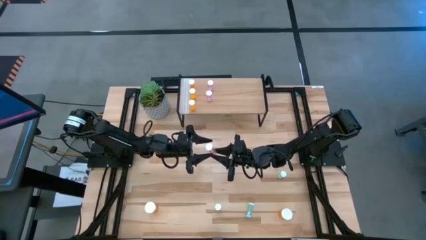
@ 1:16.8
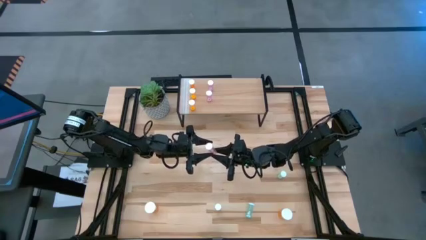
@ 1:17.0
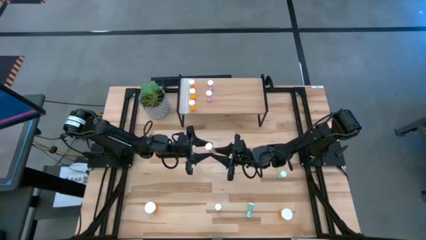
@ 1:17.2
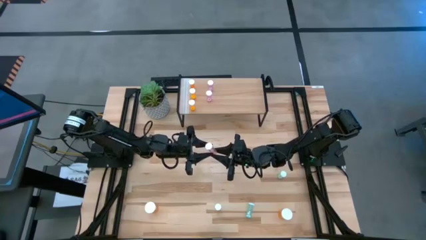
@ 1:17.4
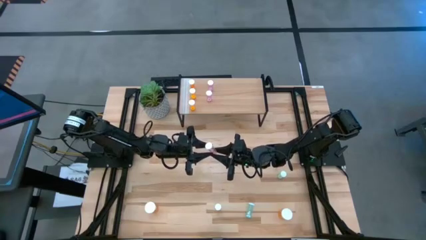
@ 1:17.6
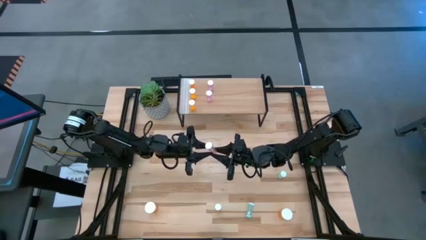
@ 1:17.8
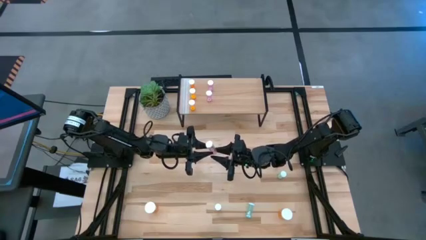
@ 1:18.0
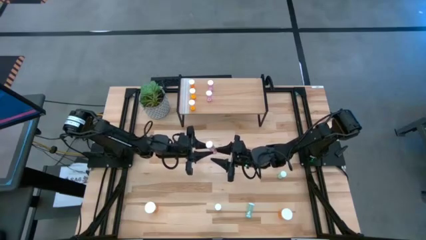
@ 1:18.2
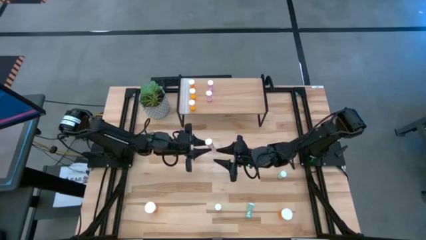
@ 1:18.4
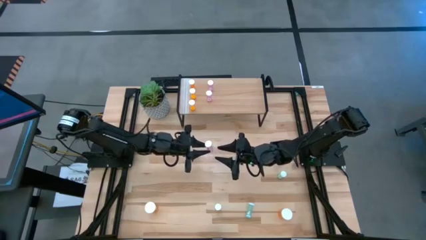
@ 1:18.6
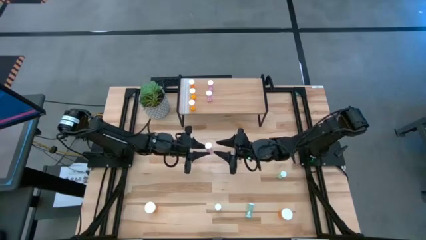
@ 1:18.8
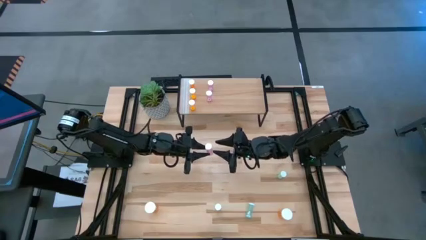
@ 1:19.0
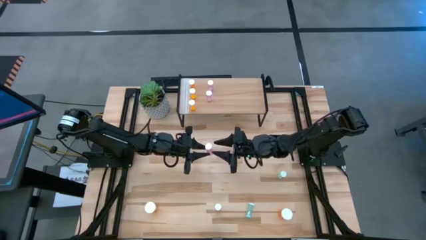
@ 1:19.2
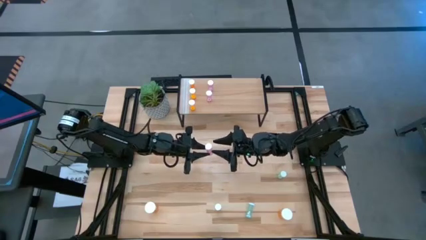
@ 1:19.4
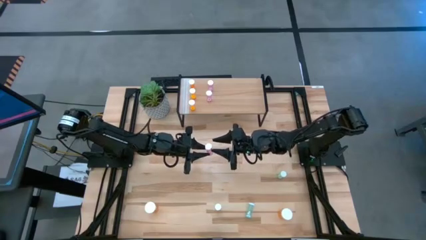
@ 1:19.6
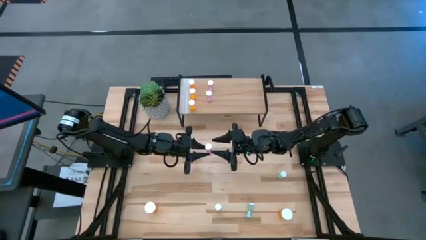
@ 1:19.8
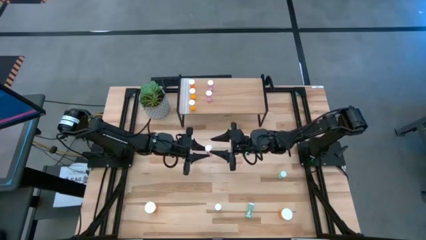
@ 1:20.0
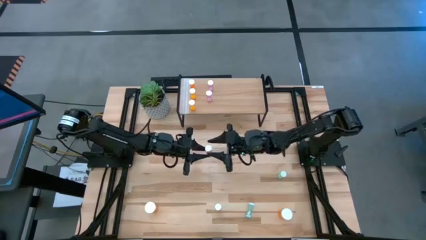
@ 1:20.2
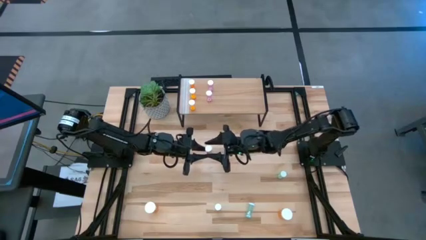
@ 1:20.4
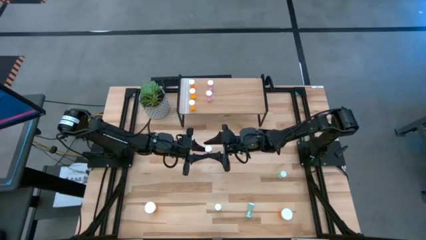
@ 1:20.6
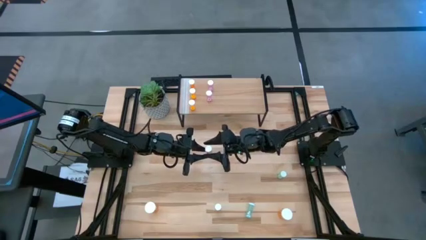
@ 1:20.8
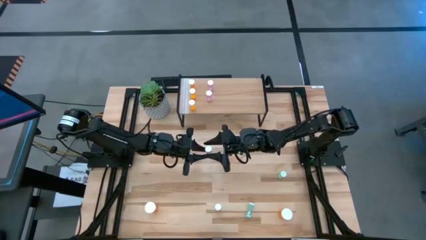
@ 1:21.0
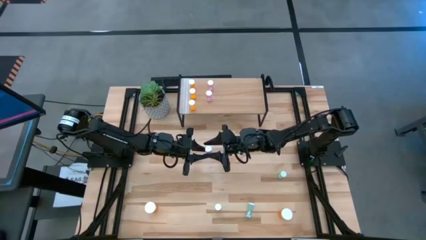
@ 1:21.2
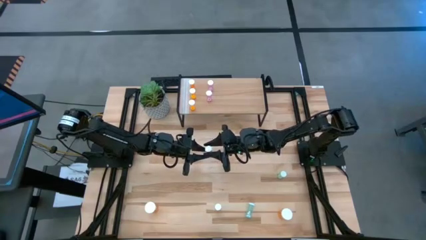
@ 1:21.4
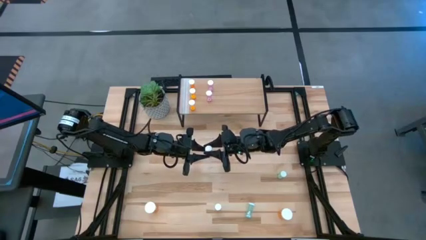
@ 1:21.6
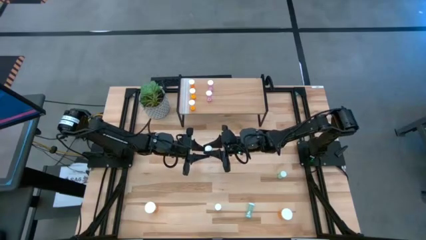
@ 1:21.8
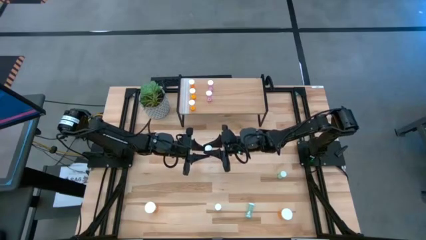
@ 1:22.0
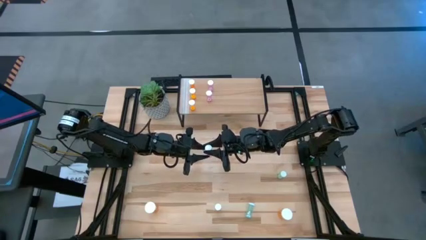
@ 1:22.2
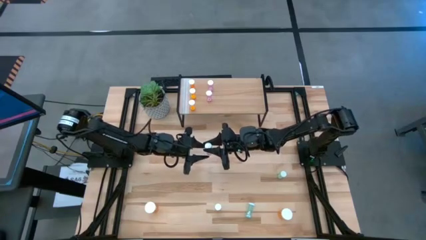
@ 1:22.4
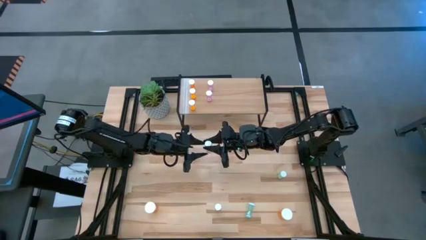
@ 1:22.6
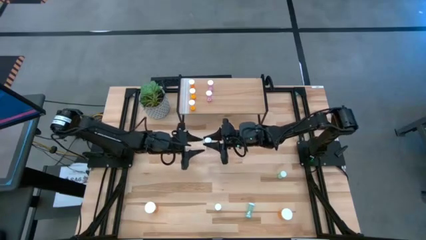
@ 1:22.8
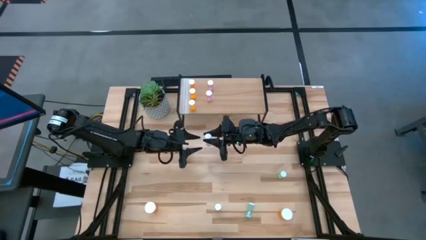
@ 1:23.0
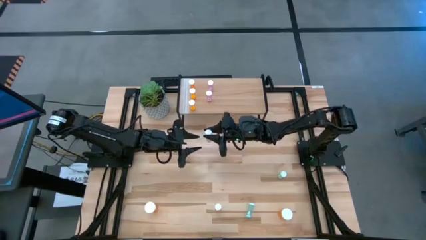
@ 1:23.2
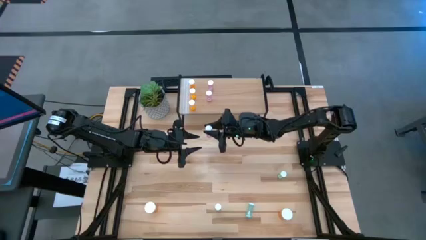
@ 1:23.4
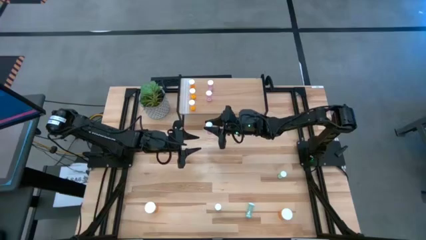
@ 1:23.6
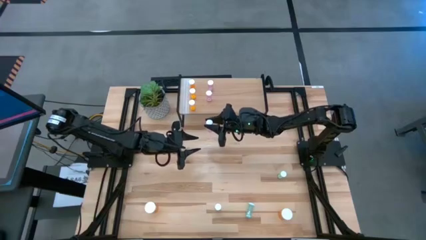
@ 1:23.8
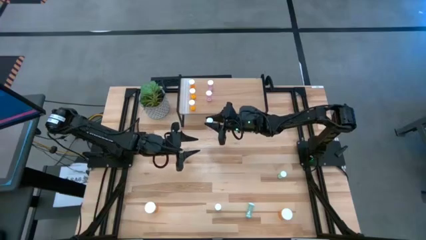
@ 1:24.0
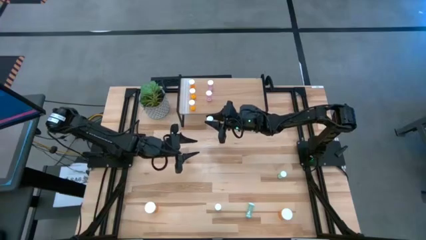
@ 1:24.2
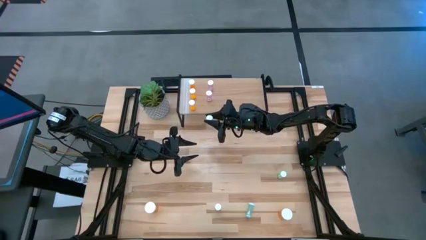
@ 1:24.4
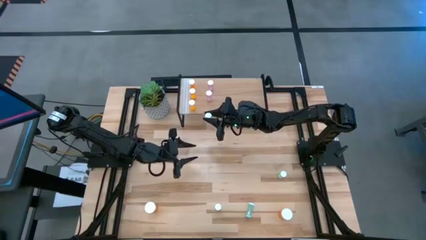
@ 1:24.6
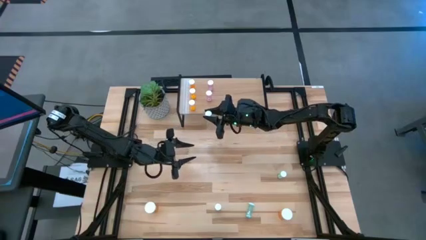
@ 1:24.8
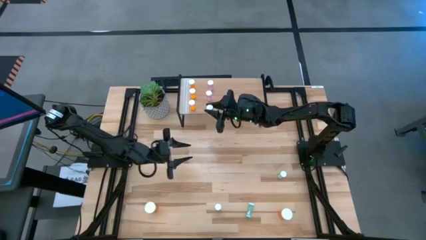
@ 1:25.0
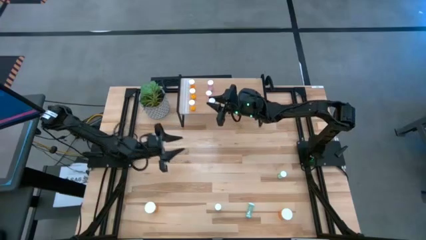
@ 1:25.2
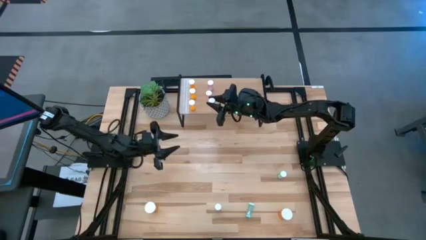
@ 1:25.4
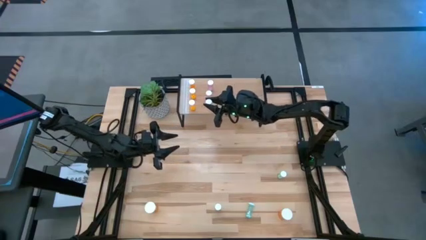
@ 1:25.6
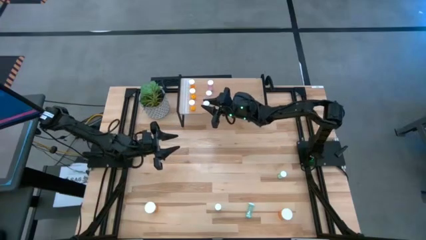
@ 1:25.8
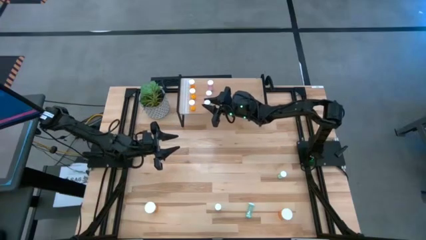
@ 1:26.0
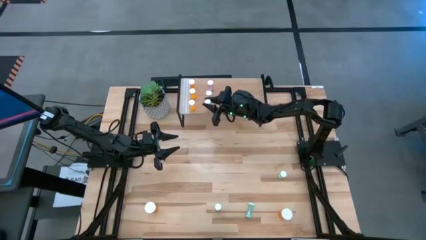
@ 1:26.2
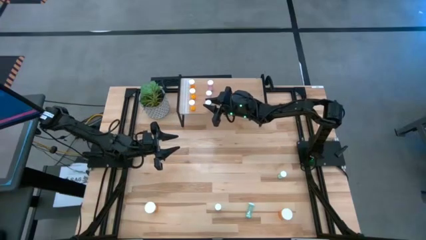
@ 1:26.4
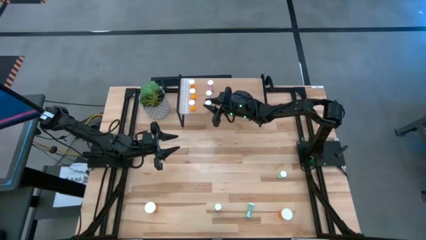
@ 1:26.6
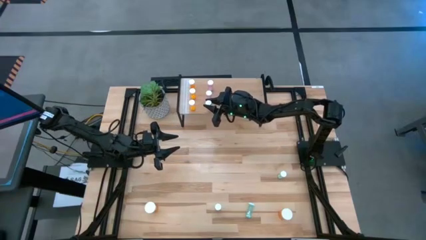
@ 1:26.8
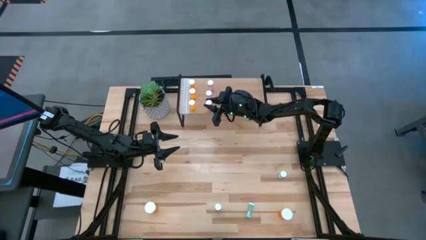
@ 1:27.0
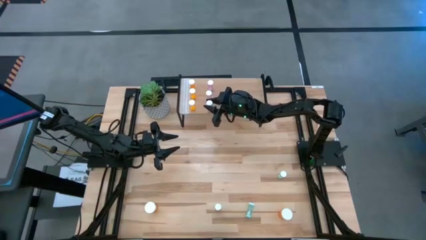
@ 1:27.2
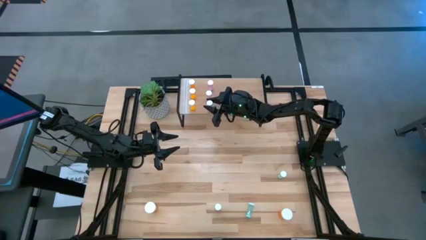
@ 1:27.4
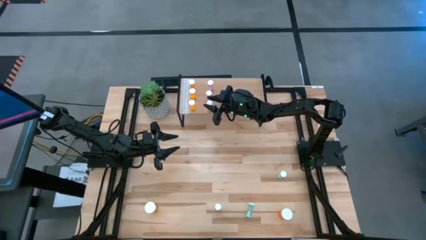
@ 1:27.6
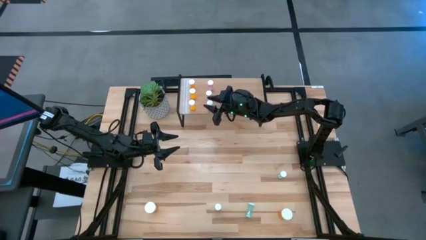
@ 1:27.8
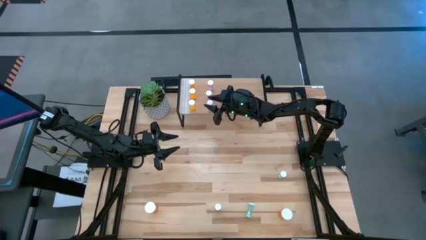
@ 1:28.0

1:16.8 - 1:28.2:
Task: Pick and place medicine bottles onto shelf by color
Put the pink pill bottle on the shelf aligned with the other pink pill bottles
